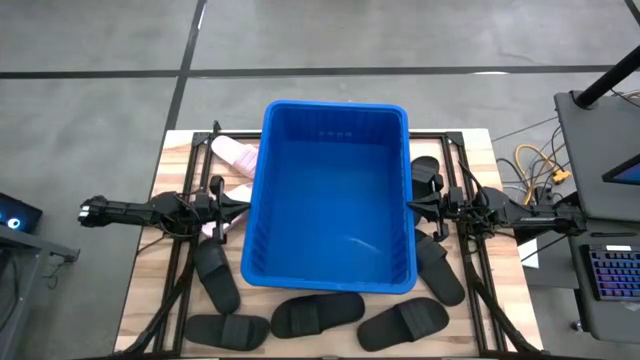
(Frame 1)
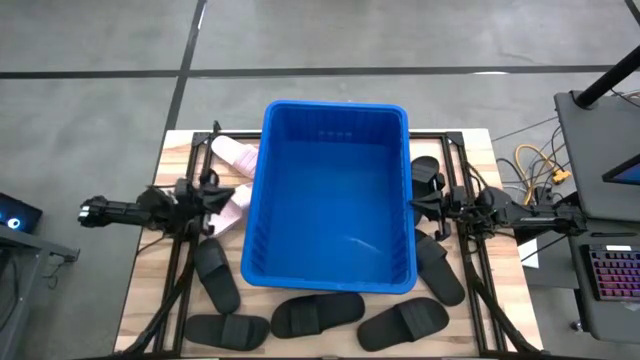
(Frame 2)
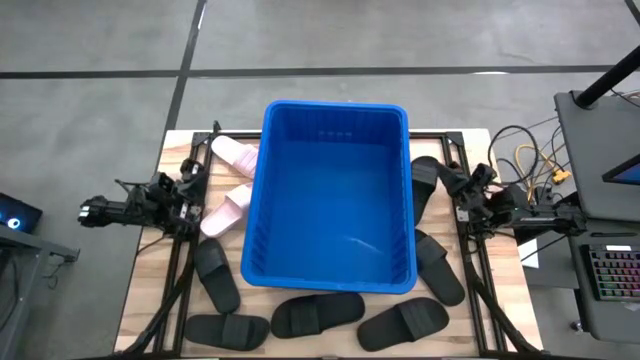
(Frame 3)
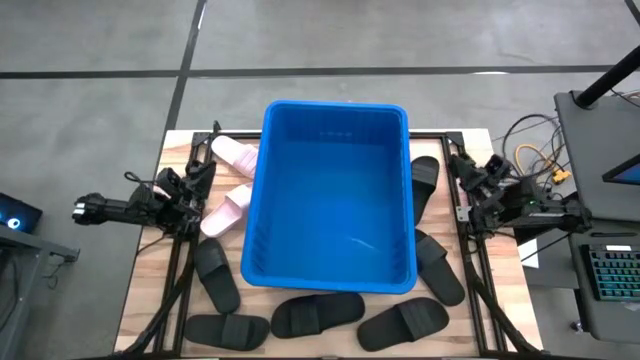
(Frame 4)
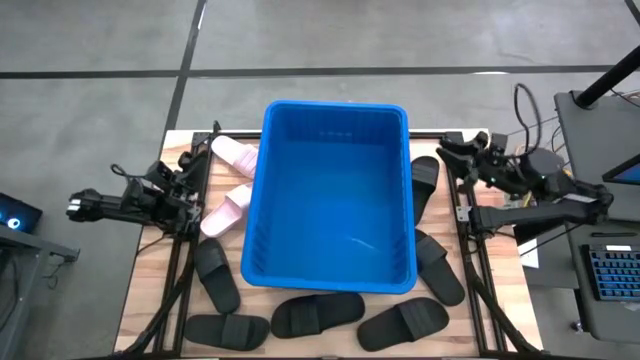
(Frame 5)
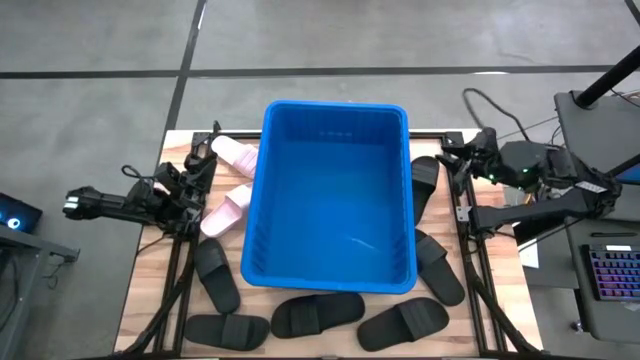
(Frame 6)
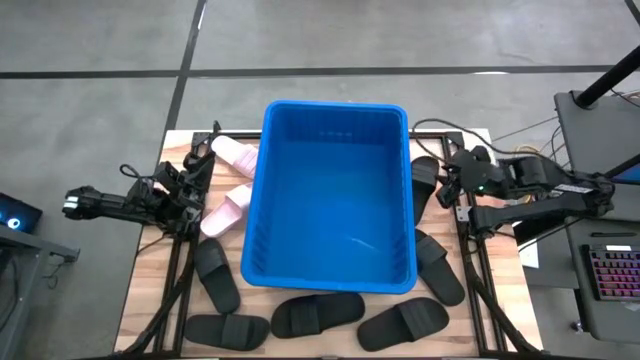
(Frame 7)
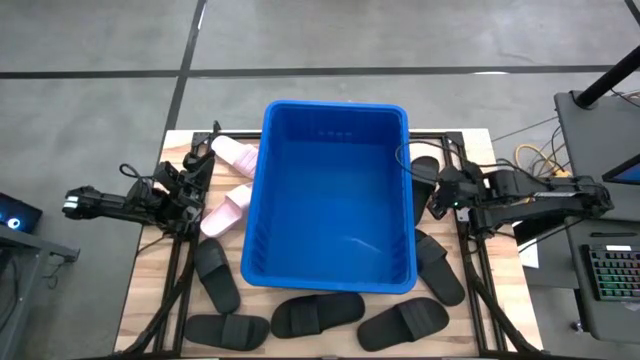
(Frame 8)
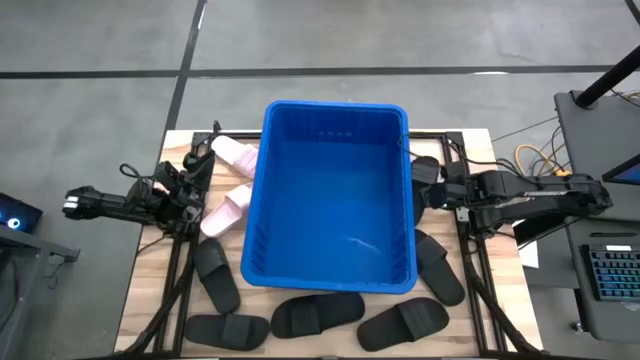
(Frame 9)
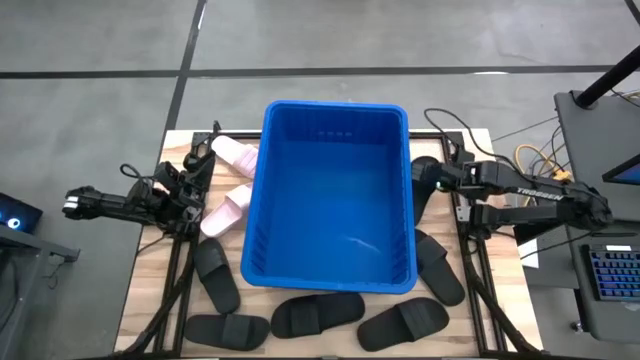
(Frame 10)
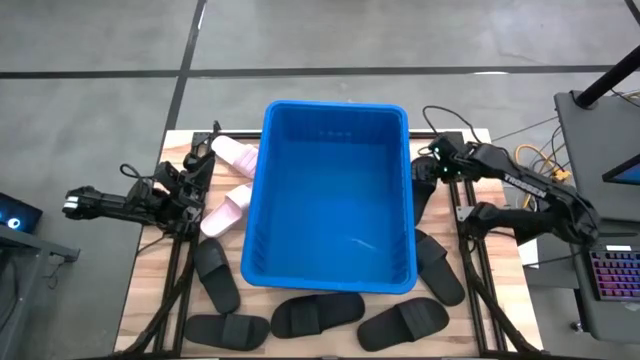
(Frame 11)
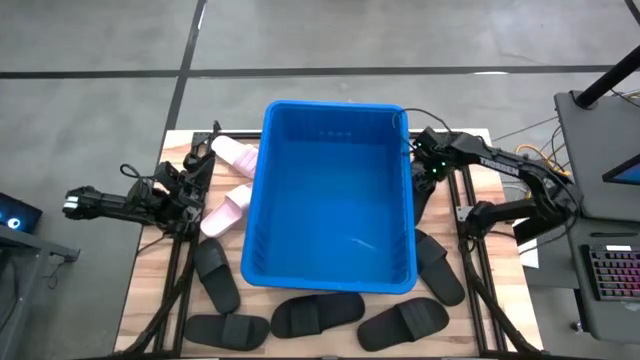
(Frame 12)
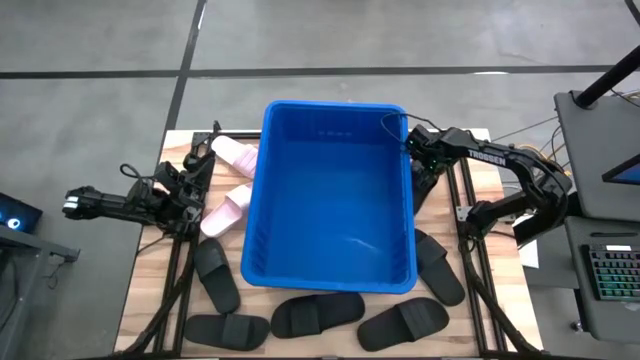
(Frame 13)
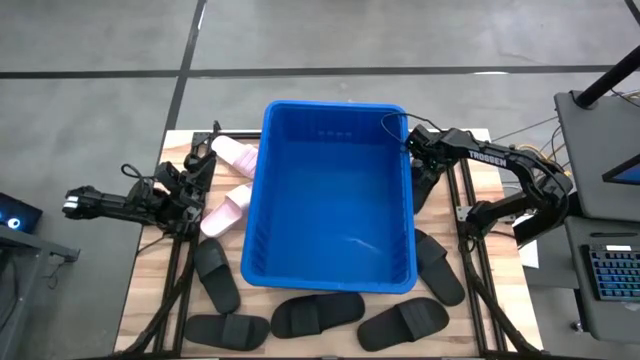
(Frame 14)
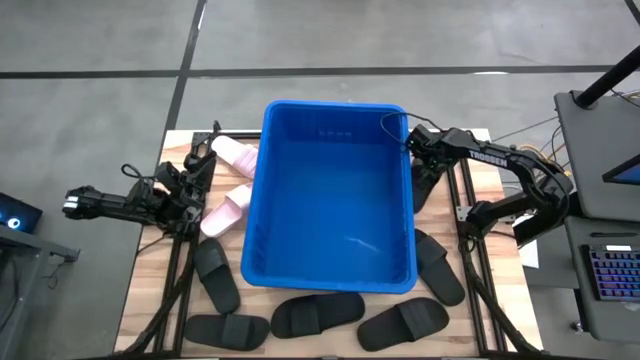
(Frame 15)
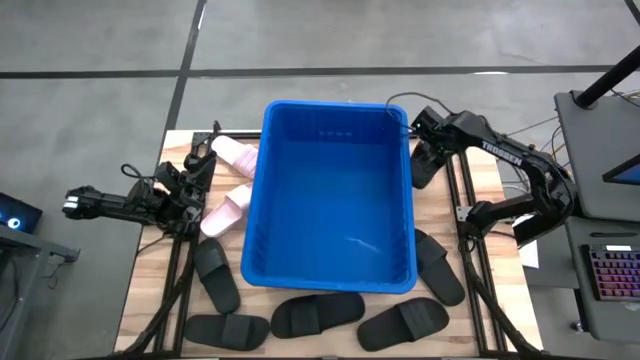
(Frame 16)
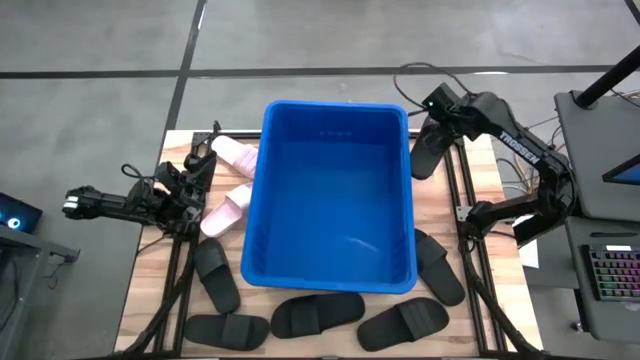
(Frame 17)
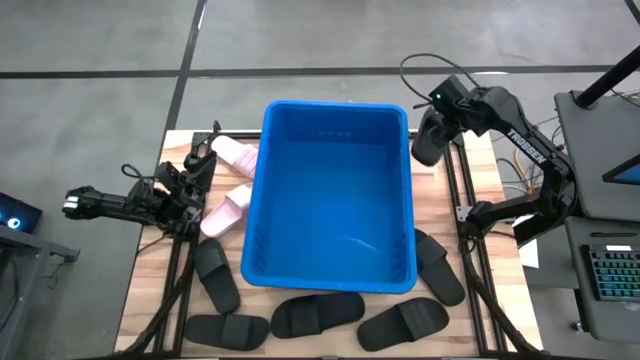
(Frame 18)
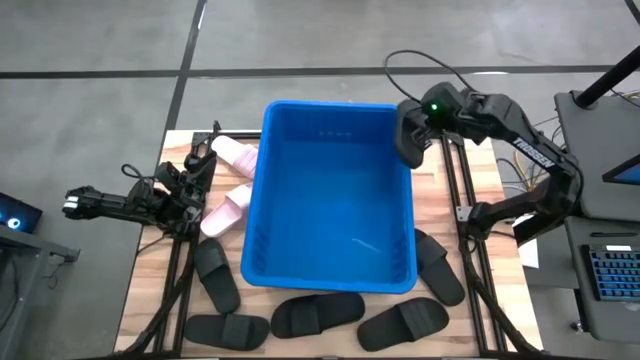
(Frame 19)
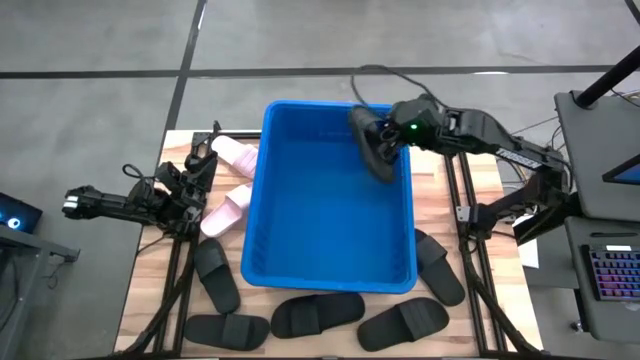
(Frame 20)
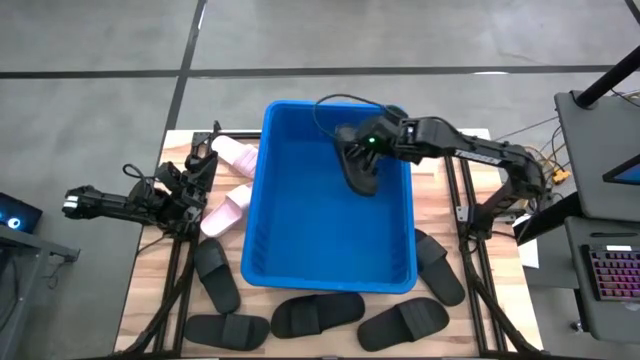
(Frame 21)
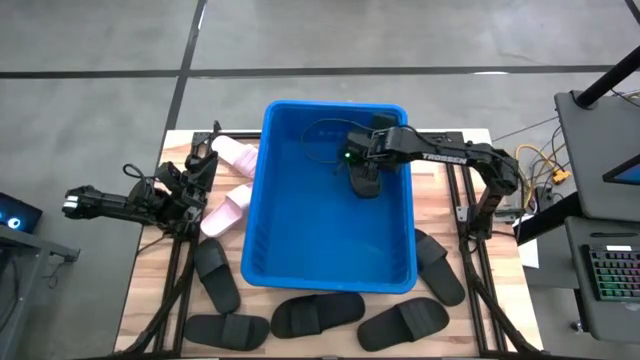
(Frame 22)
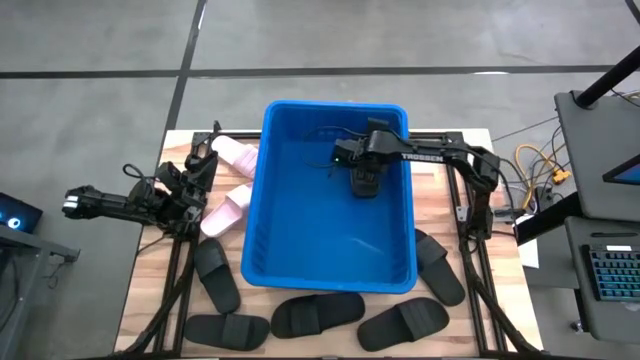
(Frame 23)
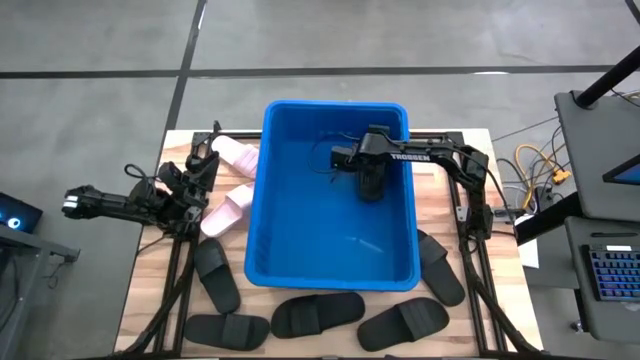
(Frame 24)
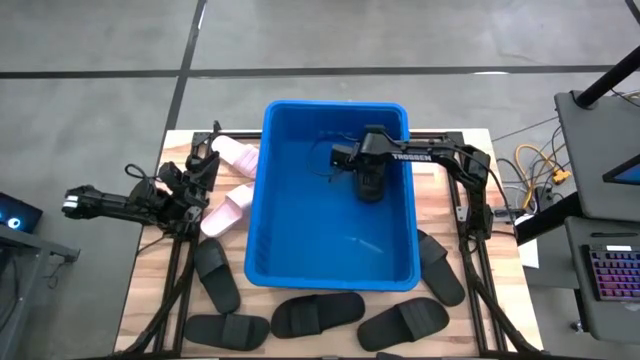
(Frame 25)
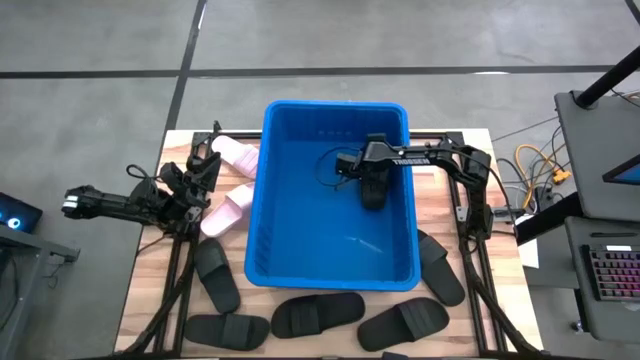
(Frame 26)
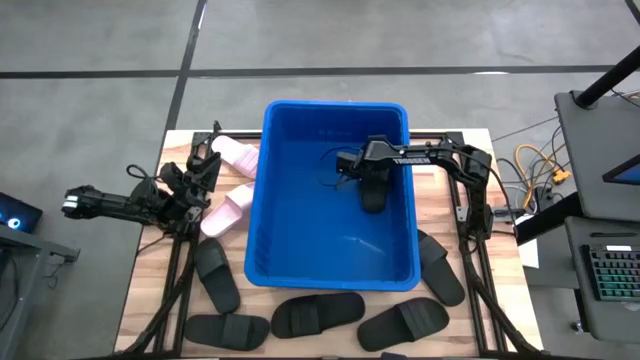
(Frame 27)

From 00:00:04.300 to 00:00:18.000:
Task: Pick and place slides into bin
Put the black slide into the blue bin

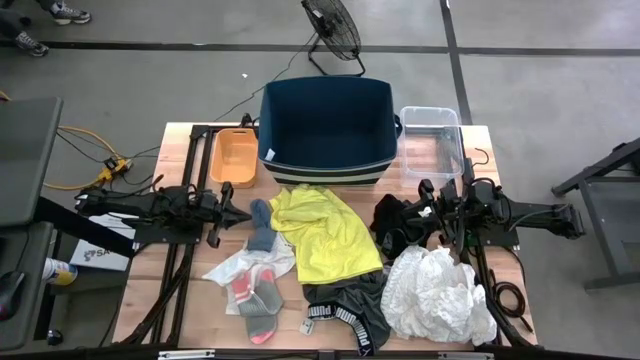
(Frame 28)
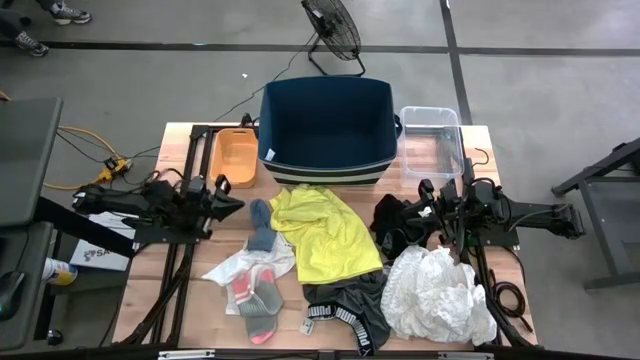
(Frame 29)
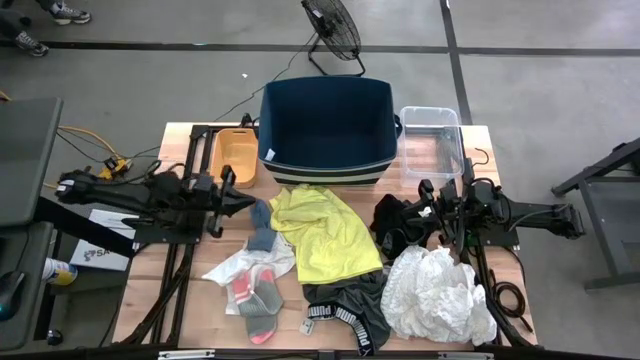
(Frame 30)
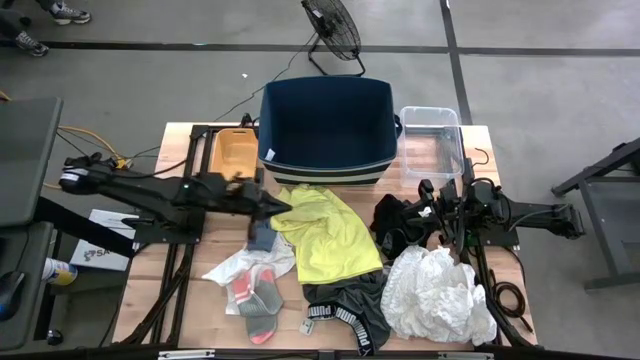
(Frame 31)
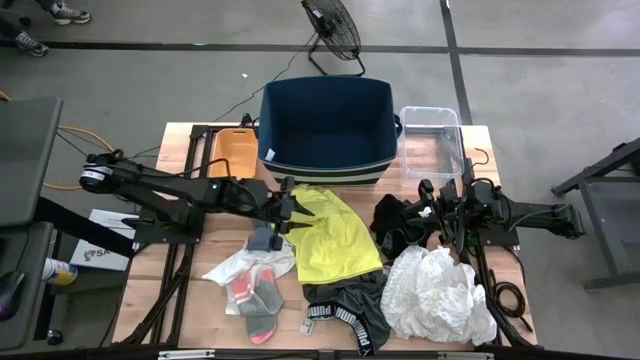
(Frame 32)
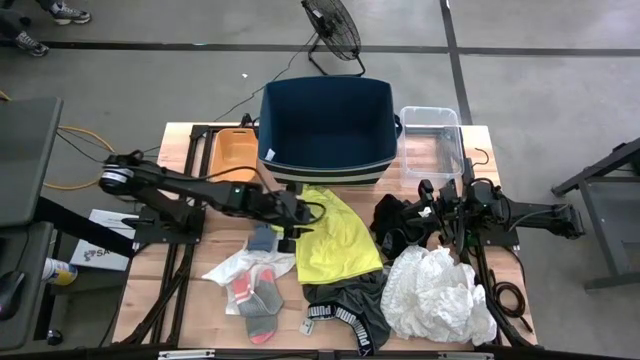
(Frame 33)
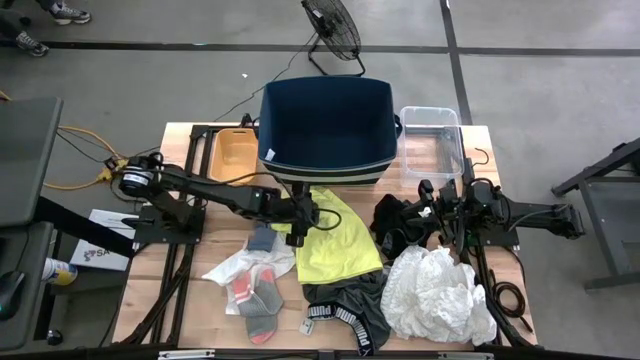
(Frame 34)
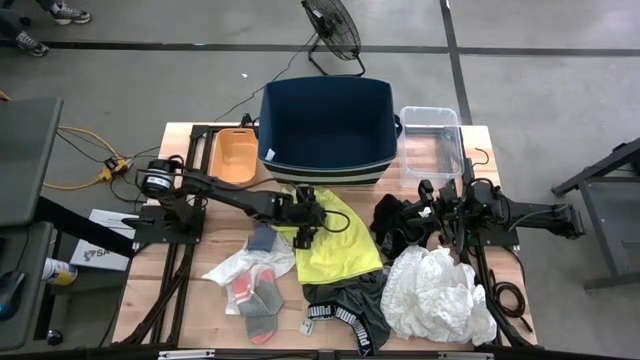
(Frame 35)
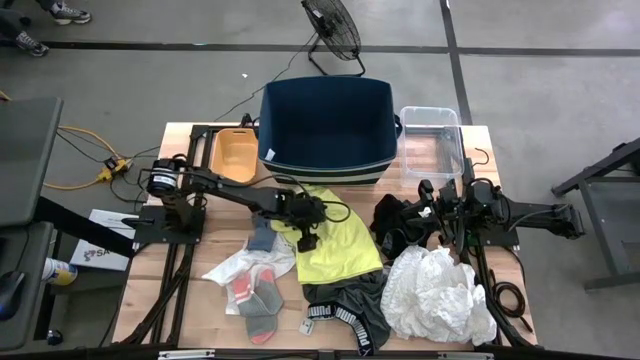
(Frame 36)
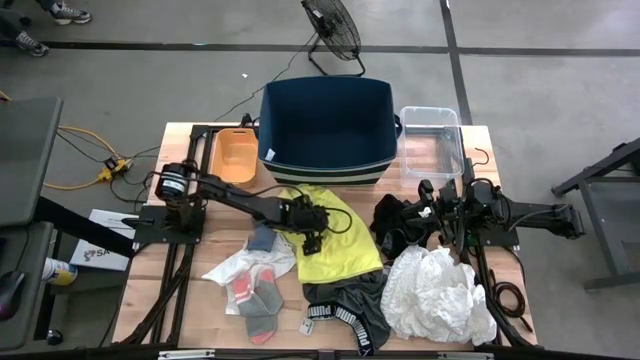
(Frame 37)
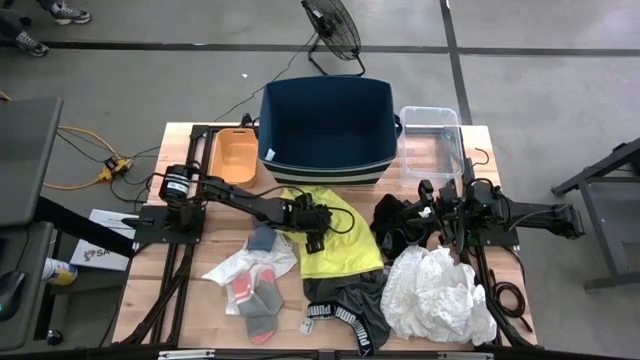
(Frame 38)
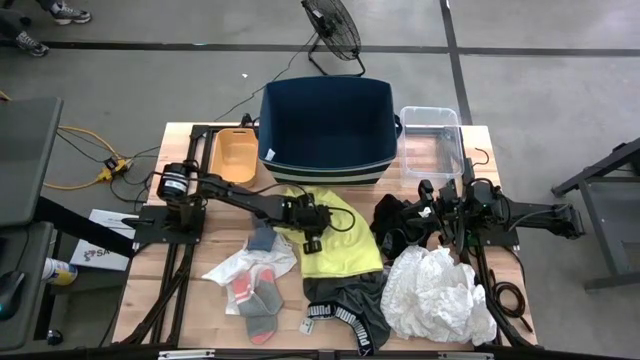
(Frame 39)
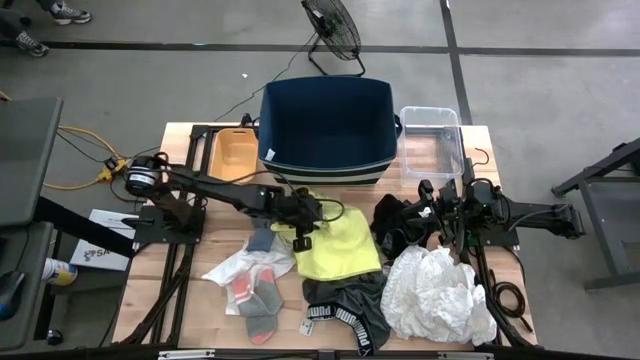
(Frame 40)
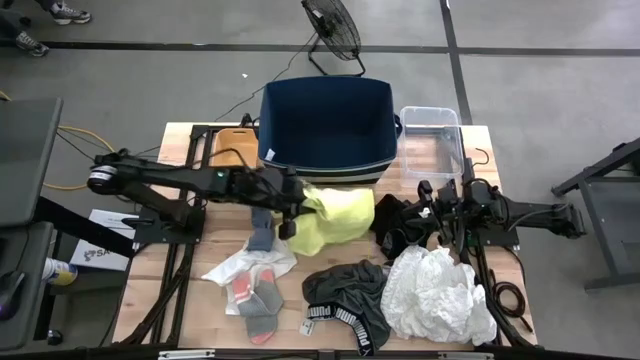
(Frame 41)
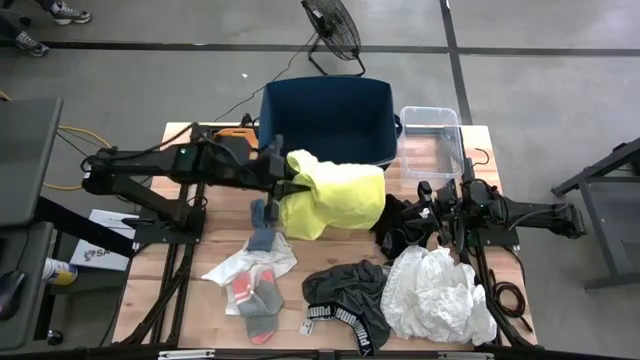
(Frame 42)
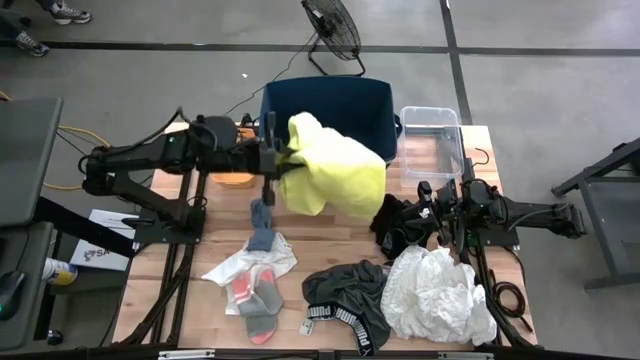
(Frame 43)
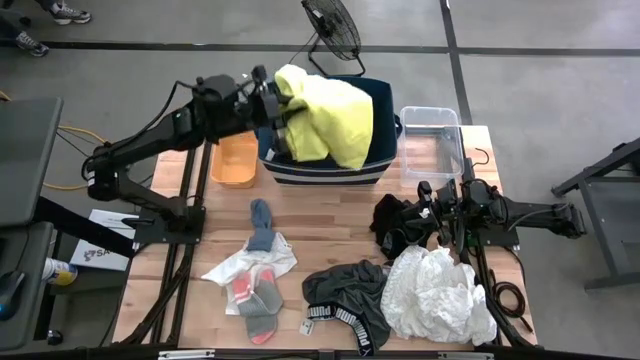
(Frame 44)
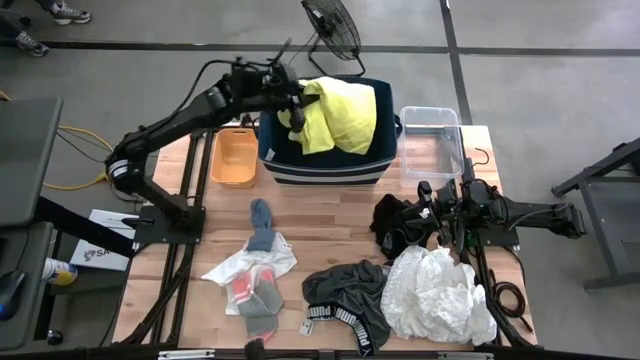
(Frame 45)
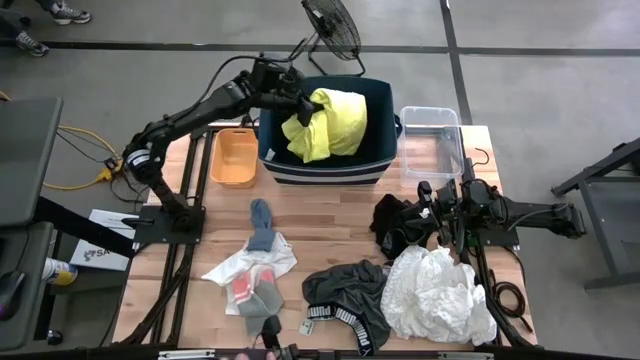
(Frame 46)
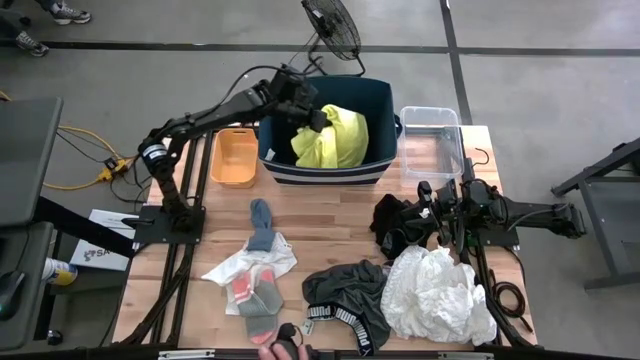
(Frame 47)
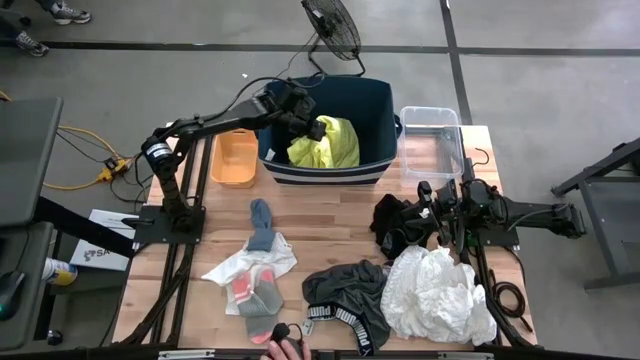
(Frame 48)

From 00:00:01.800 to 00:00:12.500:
Task: Pick & Place Cloths
Put the yellow shirt into the laundry organizer
